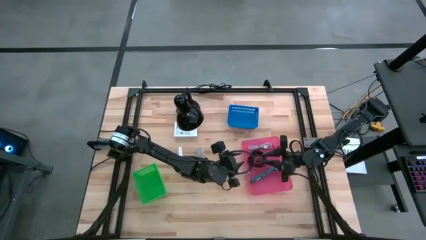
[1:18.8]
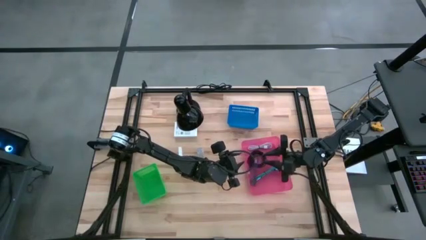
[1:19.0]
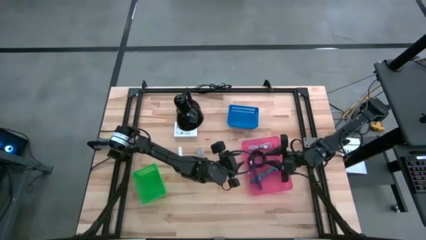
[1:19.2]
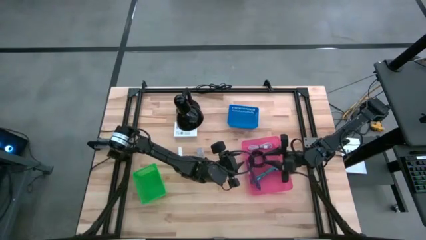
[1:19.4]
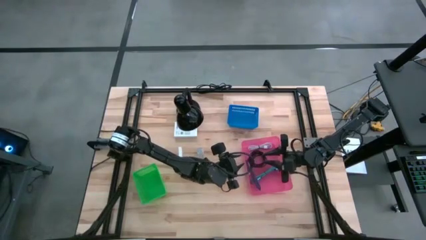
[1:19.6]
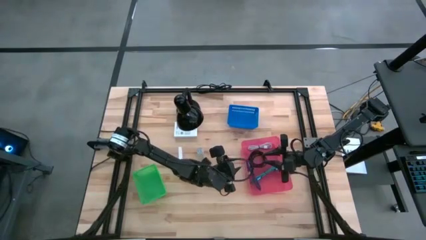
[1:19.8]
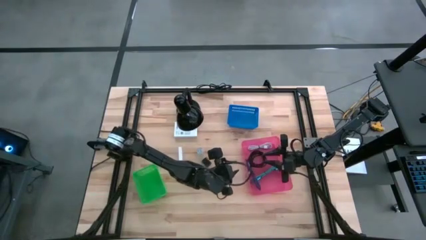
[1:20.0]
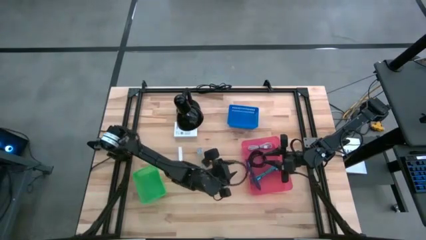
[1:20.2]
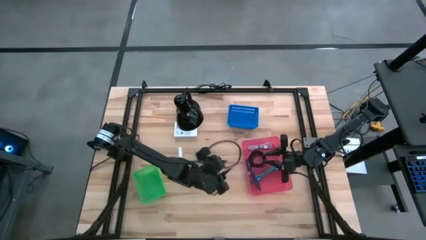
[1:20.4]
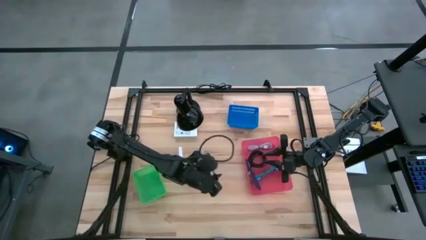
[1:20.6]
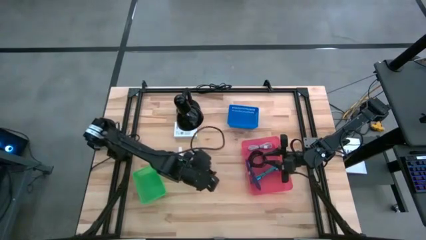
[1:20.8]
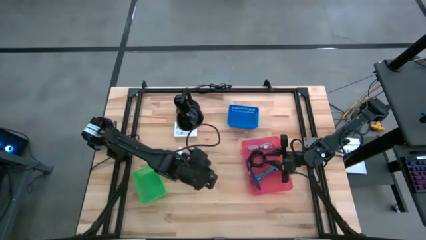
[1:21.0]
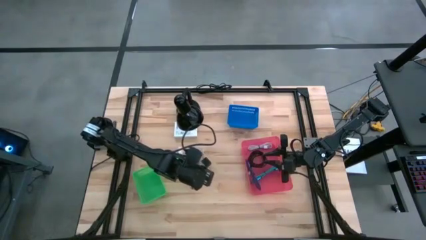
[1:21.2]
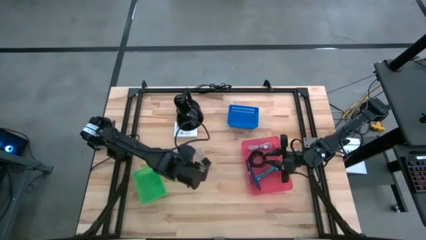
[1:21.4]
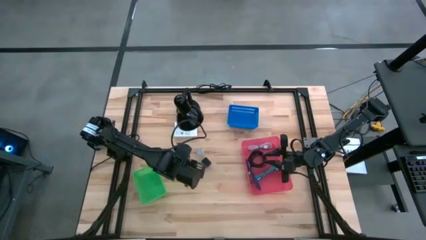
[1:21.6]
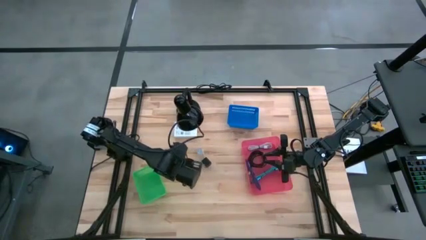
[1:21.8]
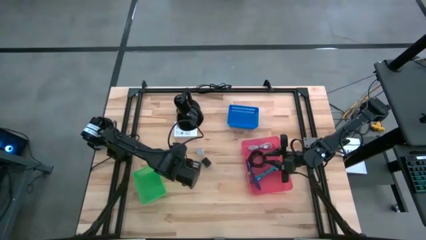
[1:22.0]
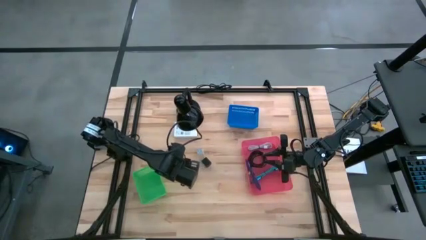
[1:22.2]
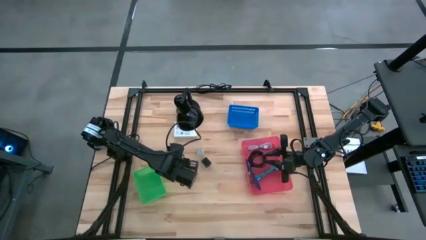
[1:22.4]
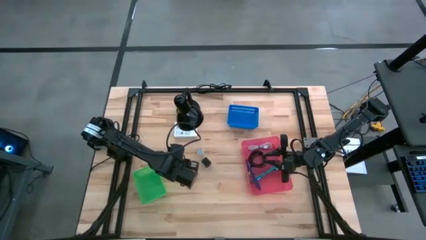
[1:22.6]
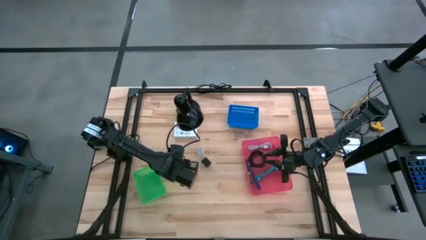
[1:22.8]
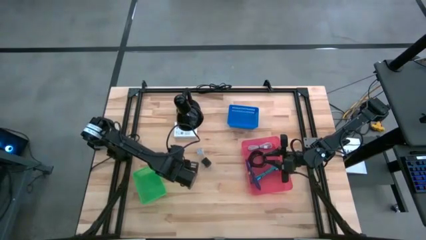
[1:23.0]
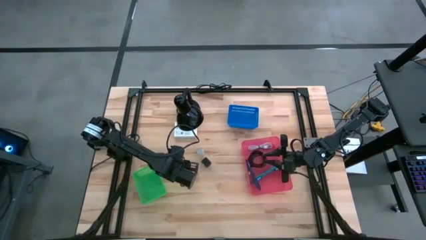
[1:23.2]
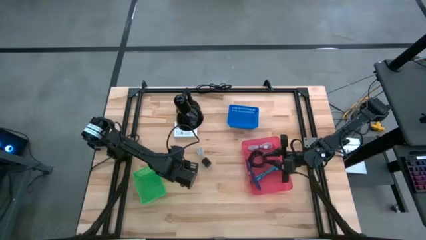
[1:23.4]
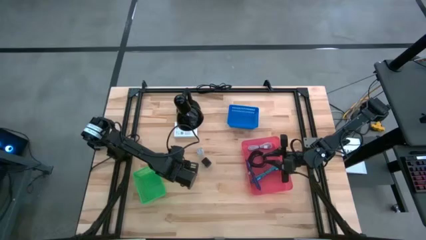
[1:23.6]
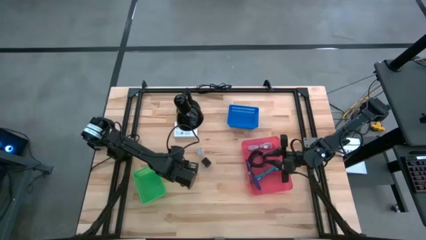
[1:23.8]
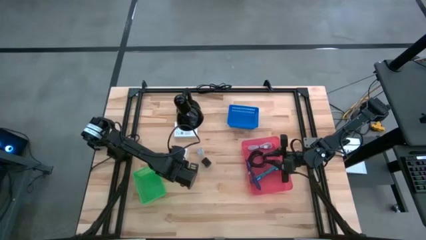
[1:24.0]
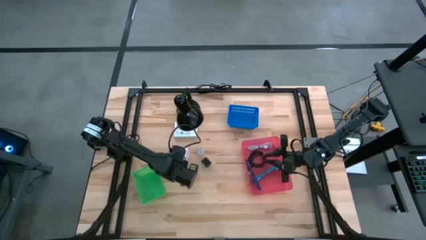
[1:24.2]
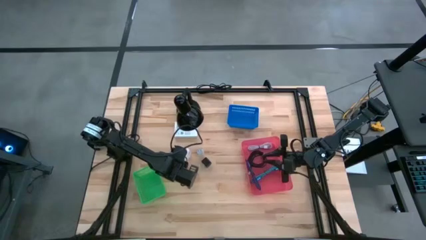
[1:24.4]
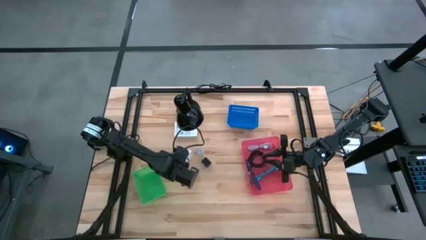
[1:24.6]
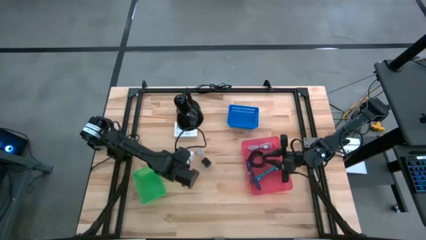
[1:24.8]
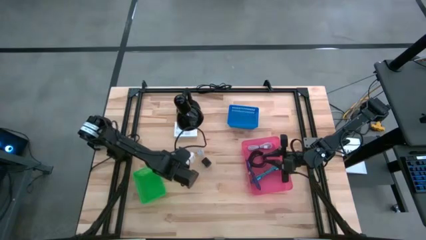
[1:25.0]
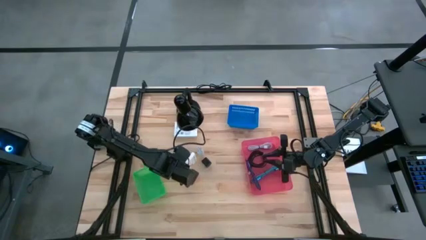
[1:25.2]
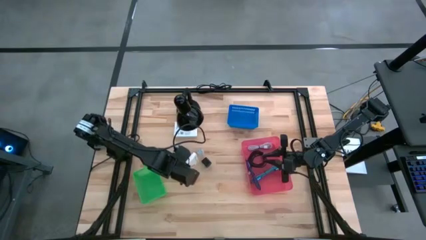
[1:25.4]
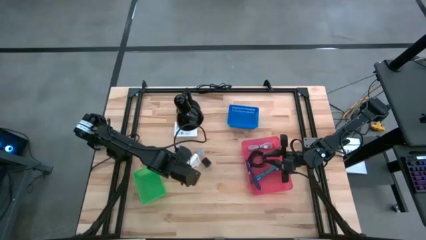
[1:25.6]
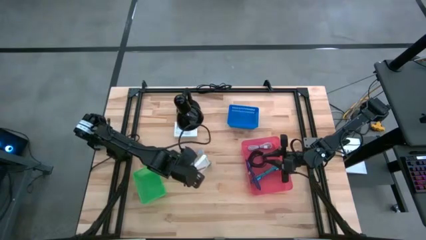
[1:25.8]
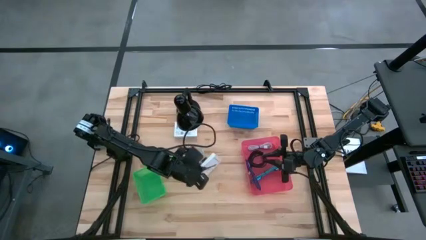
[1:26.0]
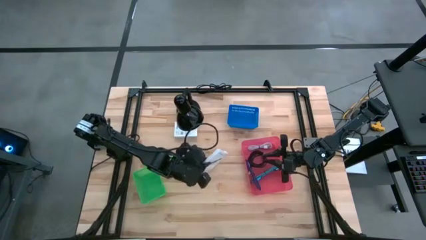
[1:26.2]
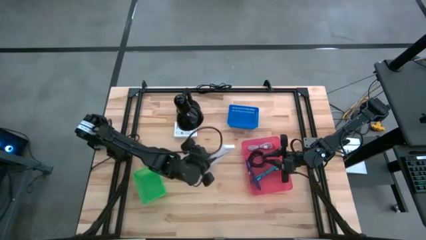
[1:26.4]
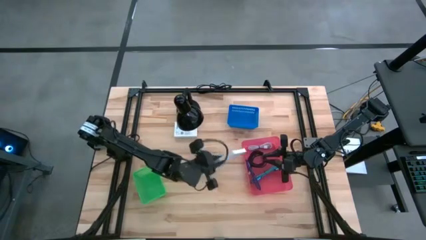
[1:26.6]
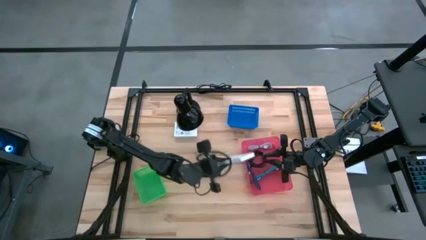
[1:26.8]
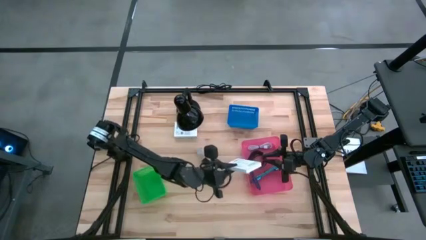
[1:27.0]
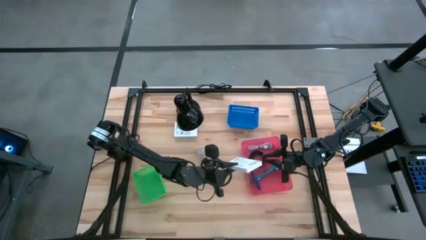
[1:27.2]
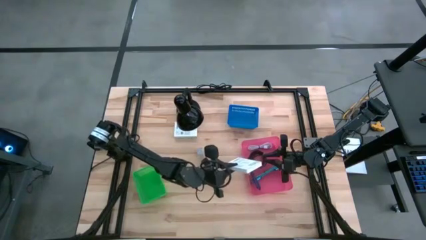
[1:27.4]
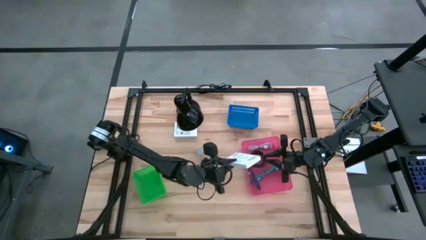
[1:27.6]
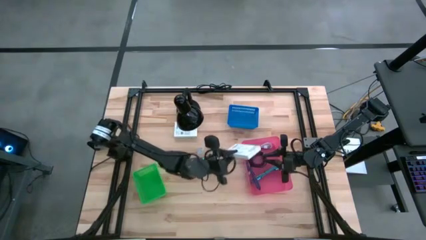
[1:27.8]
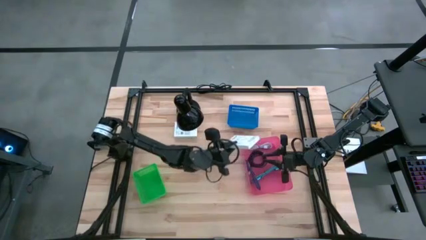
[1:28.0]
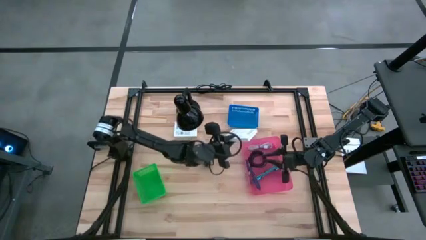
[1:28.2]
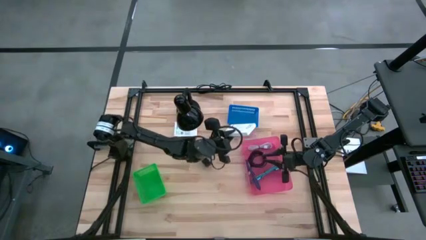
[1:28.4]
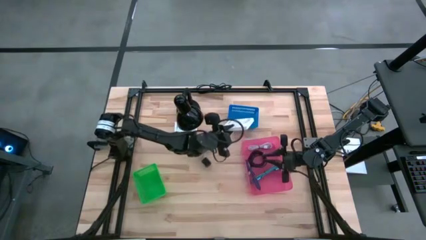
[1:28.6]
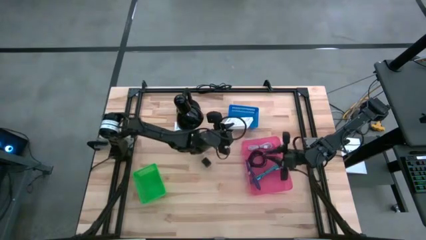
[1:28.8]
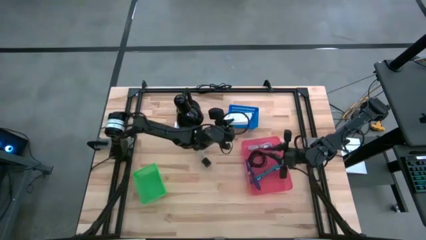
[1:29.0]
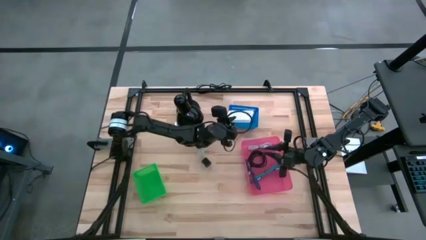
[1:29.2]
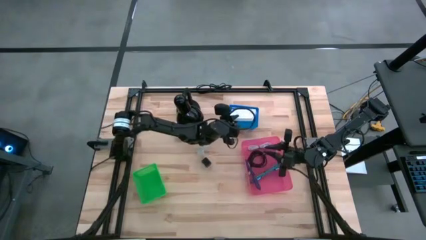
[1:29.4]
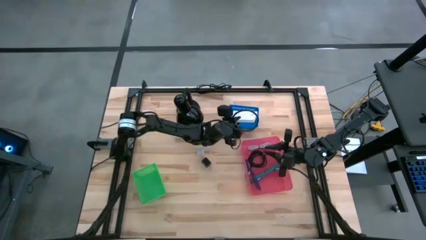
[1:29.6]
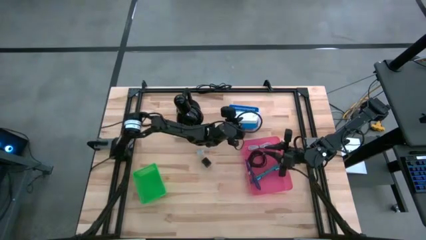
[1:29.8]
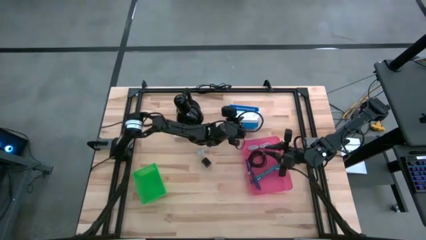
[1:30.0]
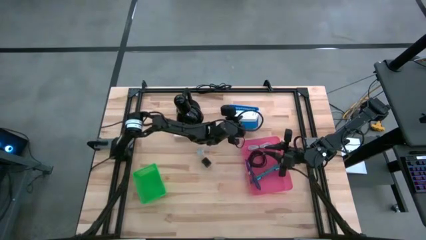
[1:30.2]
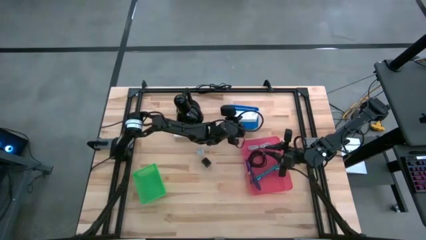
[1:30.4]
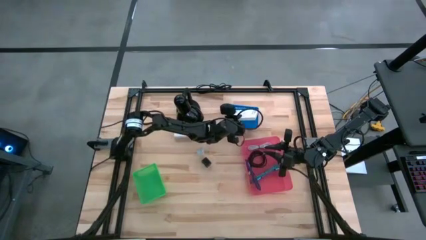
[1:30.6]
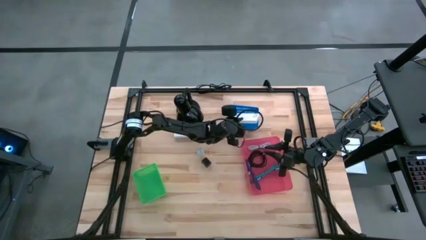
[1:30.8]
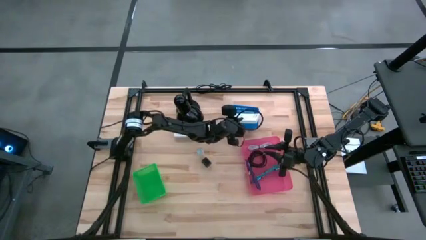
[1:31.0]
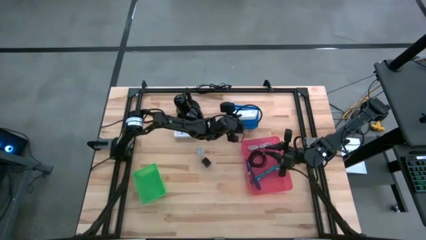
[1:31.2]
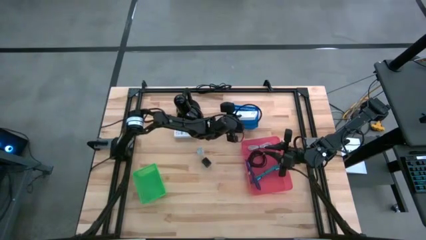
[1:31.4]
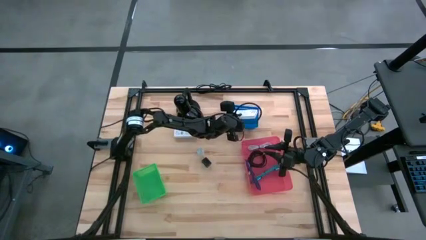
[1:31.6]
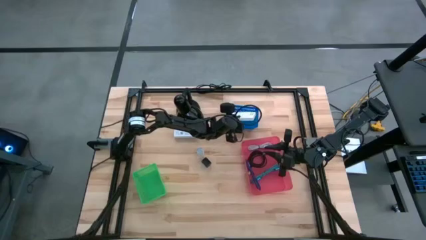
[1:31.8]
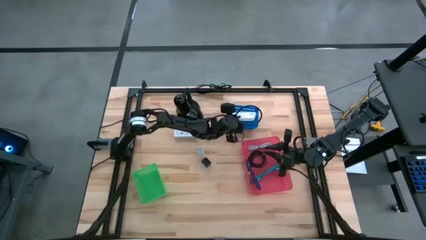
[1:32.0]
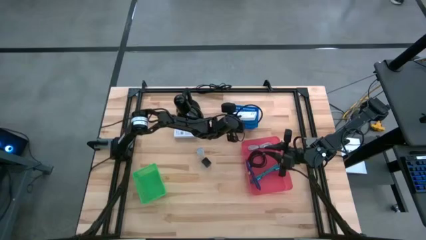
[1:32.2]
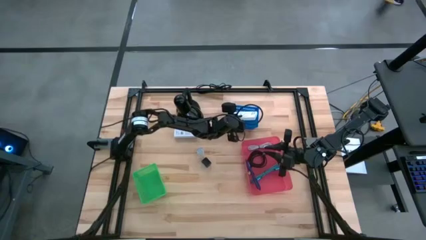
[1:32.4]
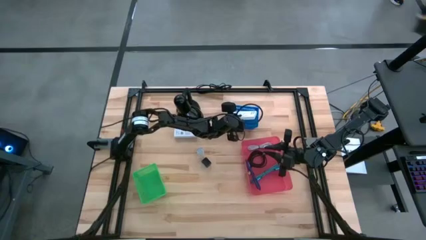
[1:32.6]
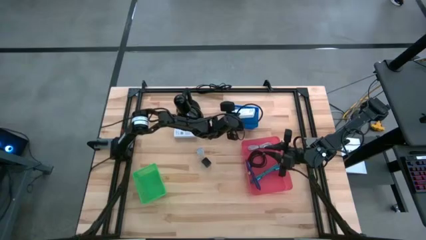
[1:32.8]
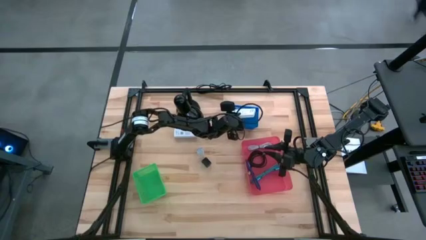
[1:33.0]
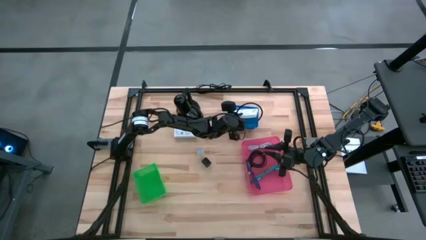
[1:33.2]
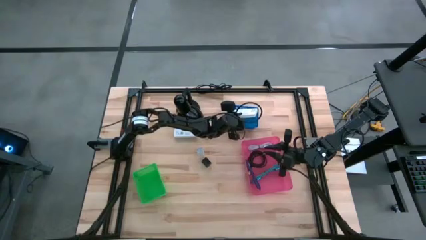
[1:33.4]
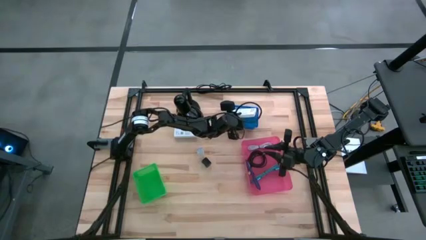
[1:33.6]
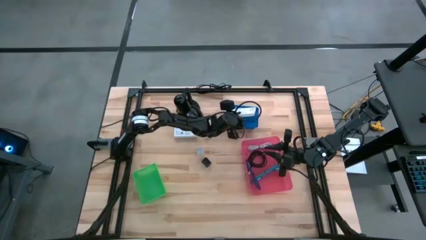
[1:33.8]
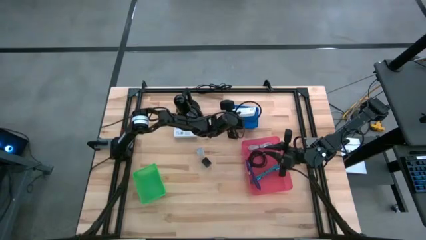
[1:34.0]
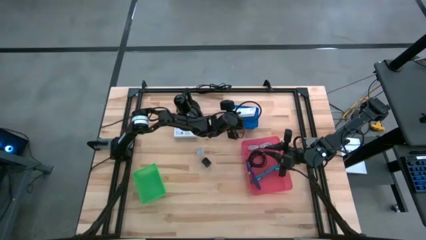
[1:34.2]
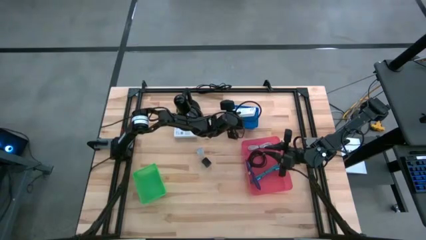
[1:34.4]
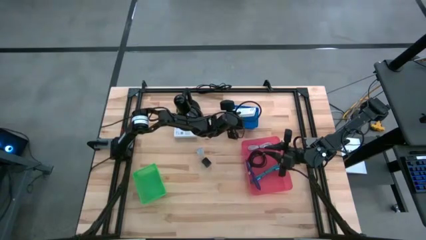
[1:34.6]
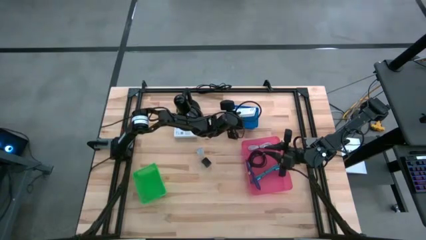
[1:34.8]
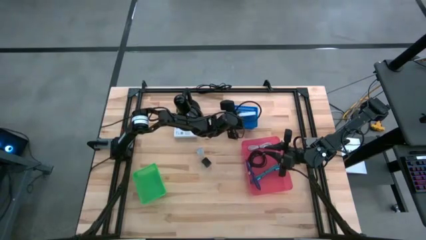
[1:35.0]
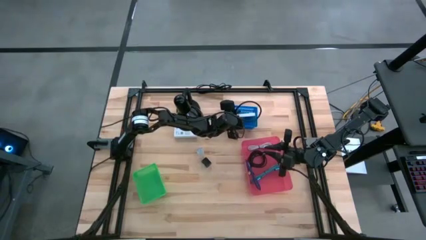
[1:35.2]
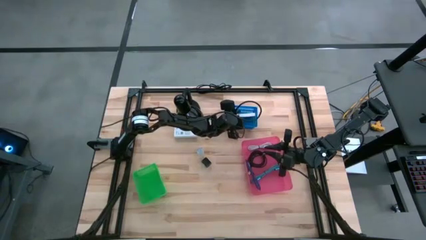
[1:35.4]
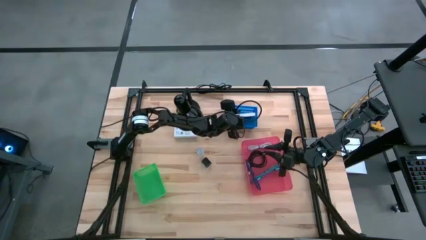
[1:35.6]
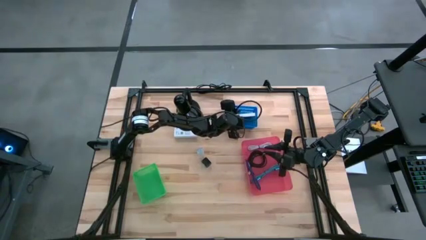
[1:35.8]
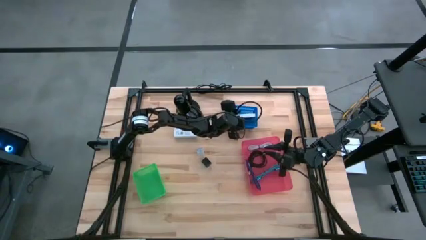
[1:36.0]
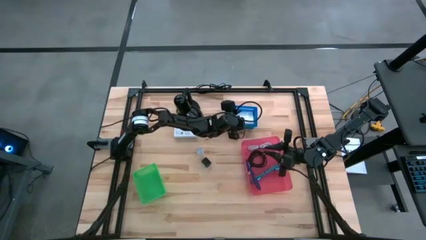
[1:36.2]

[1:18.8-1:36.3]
Task: Pick and place items into bin
Put the bottom white card reader box into the blue bin
